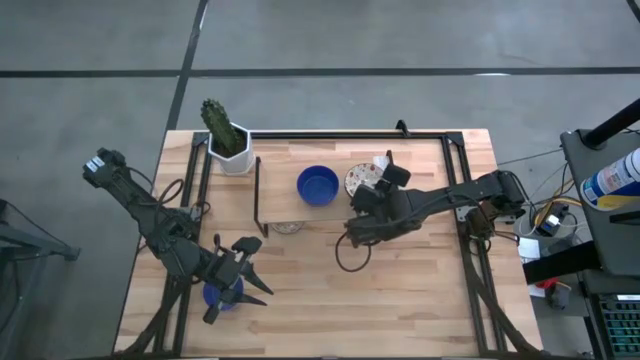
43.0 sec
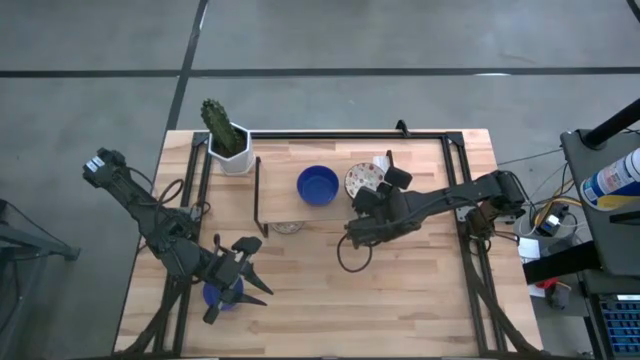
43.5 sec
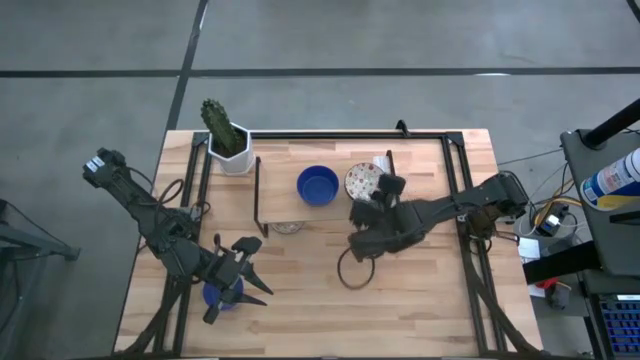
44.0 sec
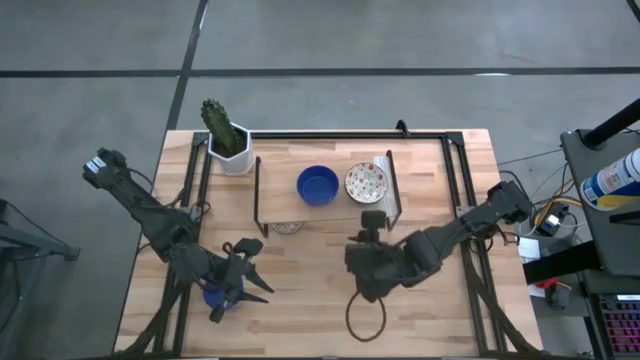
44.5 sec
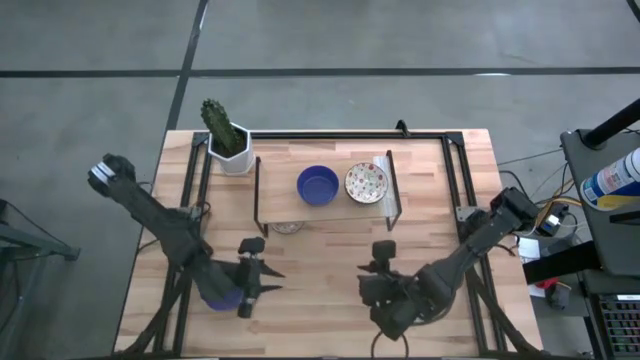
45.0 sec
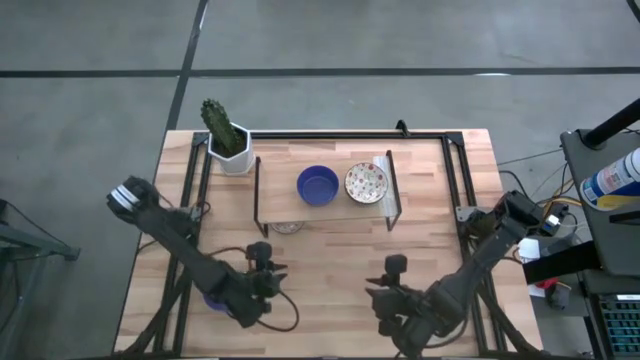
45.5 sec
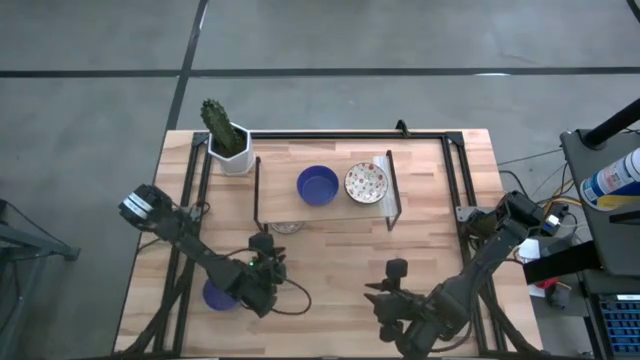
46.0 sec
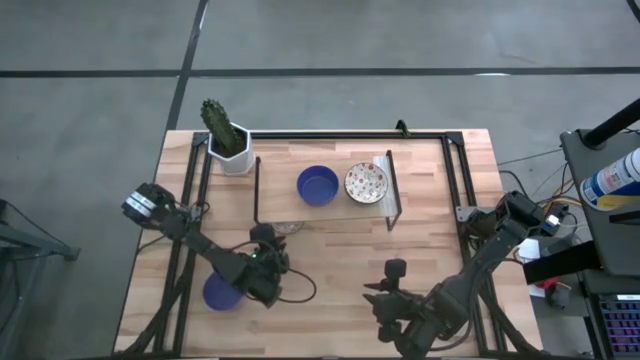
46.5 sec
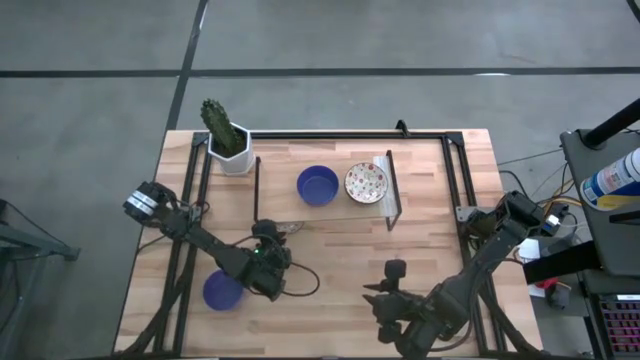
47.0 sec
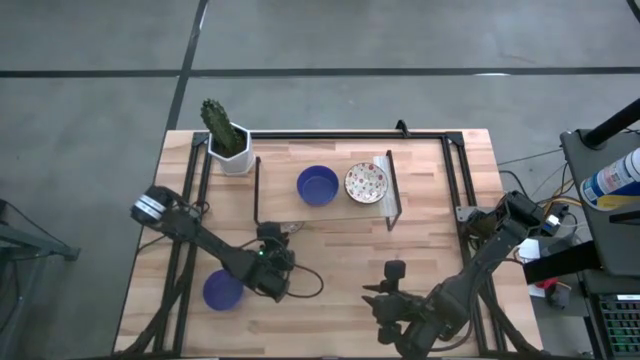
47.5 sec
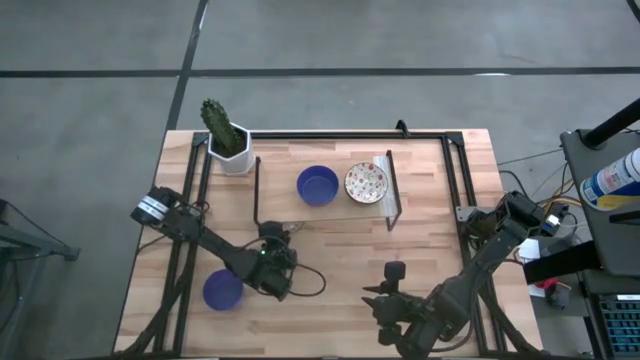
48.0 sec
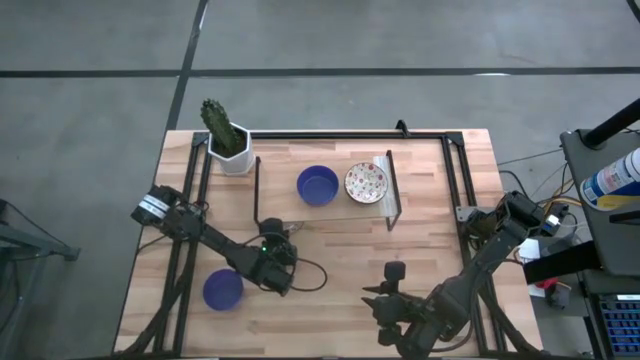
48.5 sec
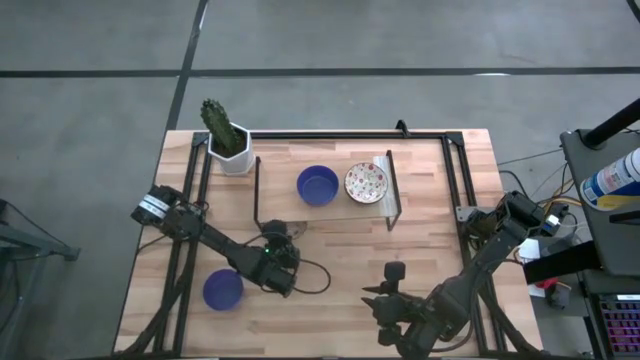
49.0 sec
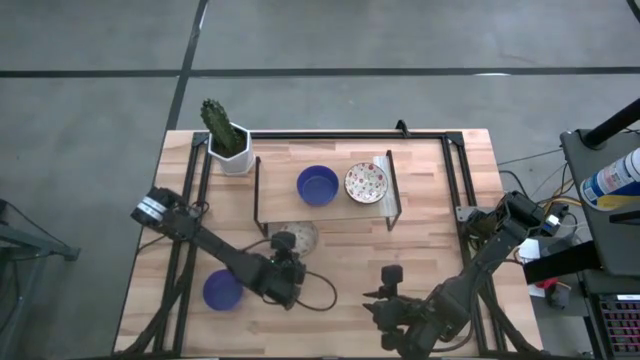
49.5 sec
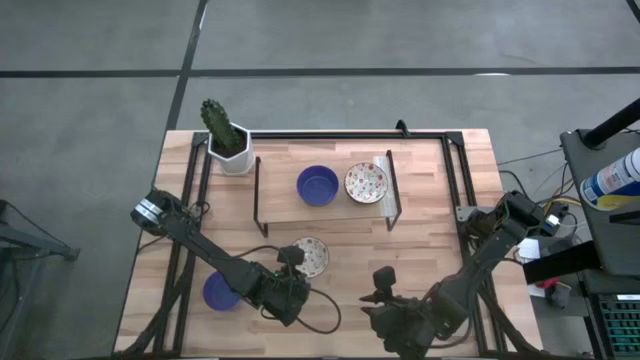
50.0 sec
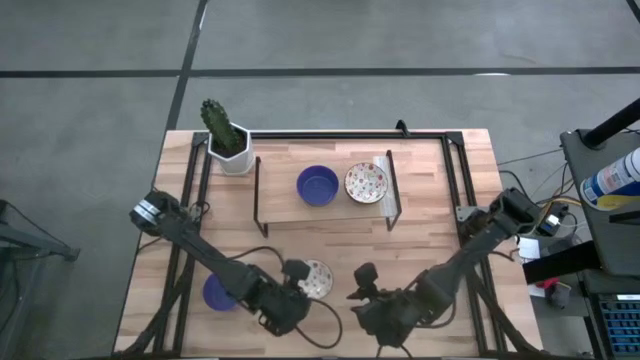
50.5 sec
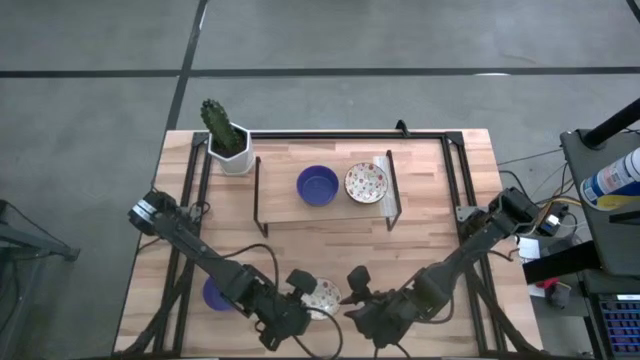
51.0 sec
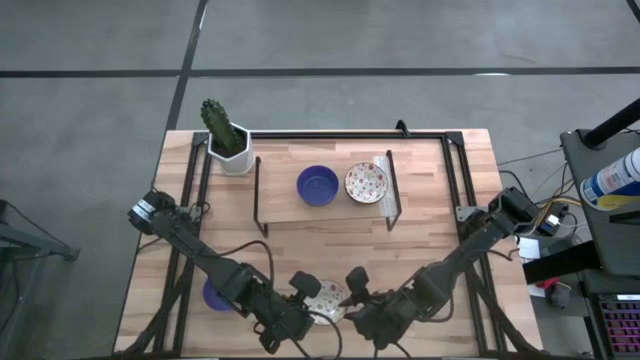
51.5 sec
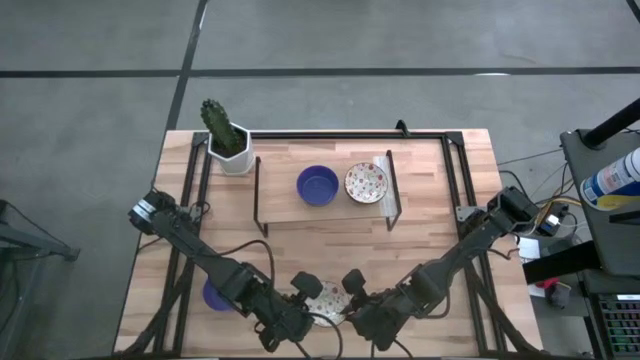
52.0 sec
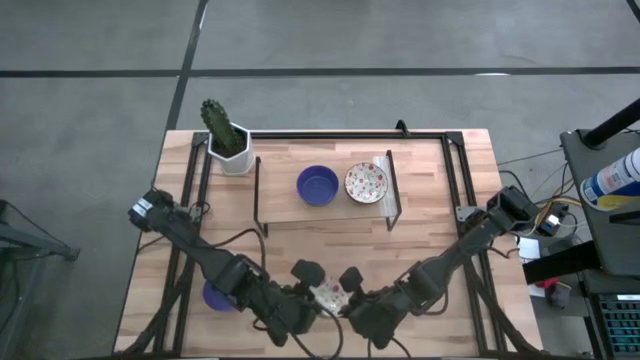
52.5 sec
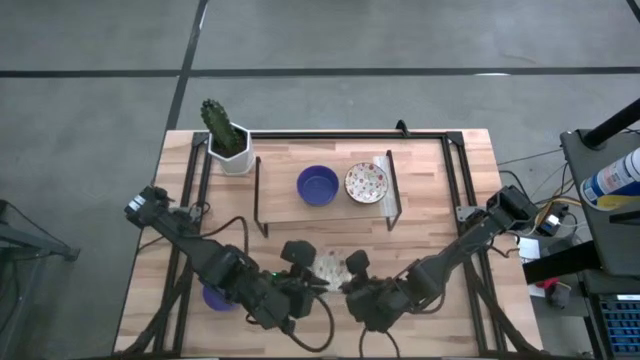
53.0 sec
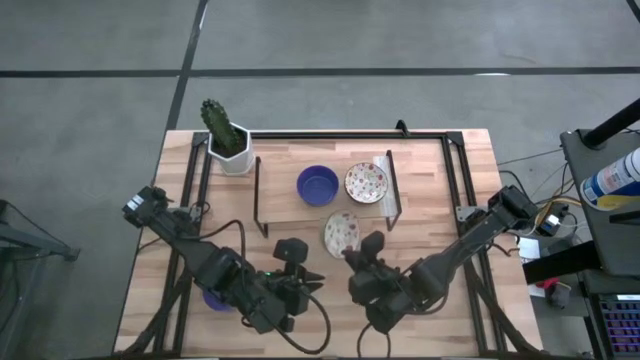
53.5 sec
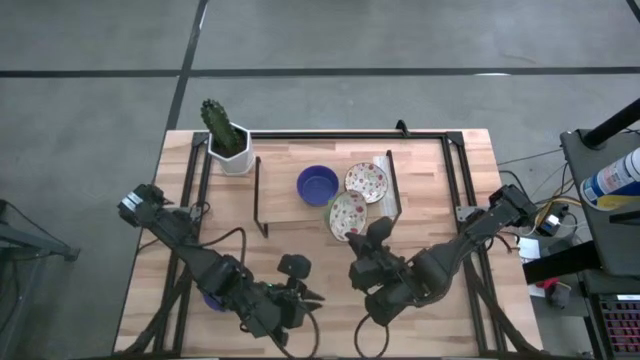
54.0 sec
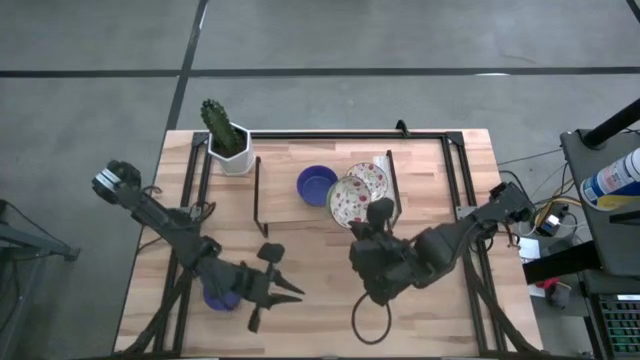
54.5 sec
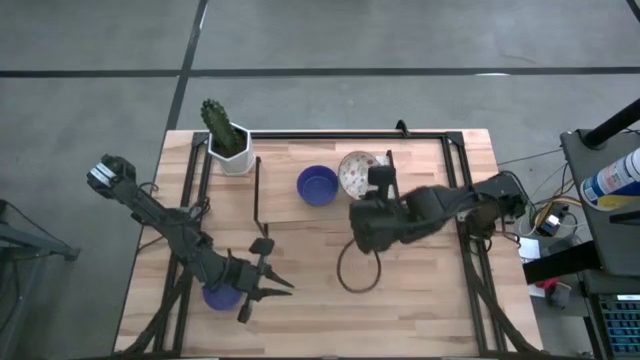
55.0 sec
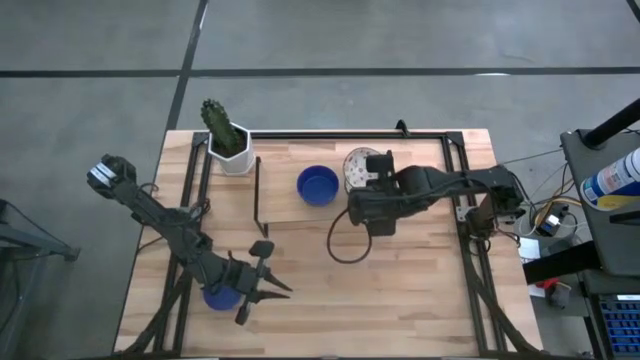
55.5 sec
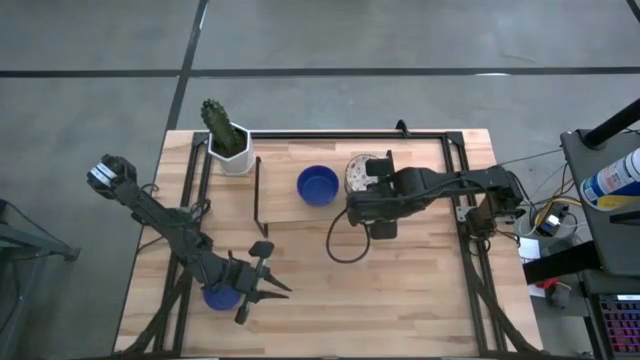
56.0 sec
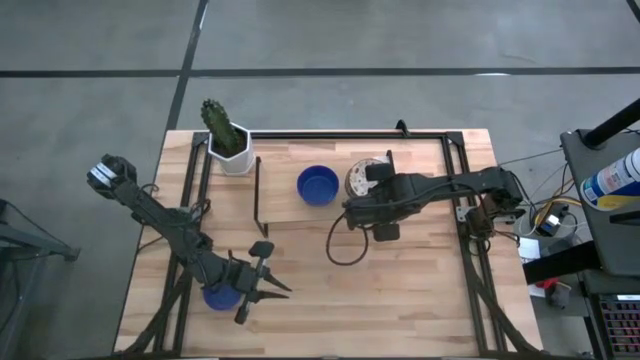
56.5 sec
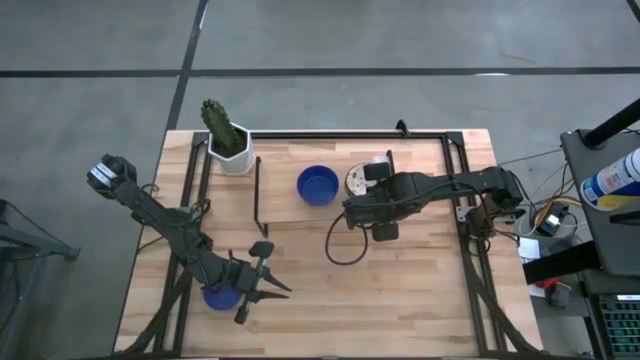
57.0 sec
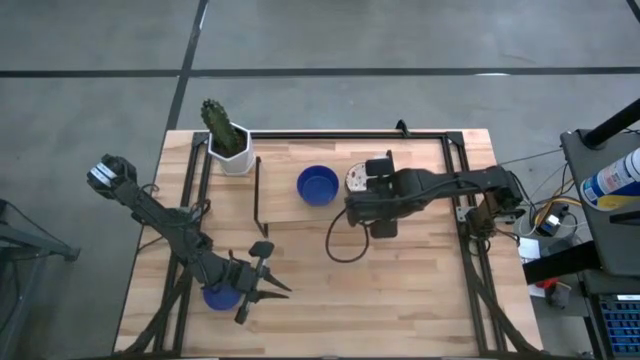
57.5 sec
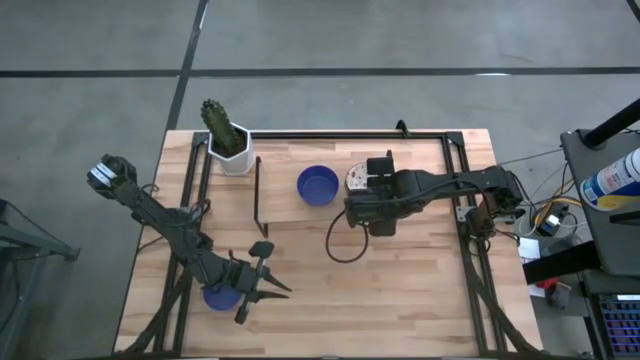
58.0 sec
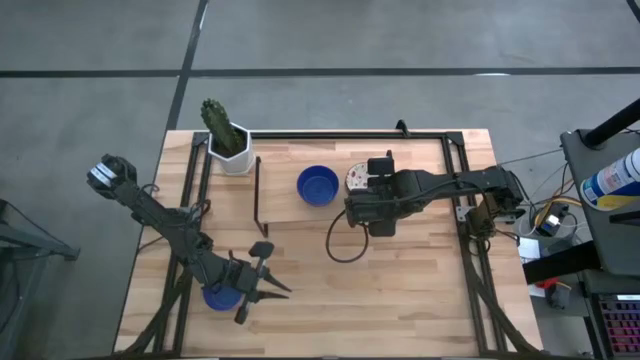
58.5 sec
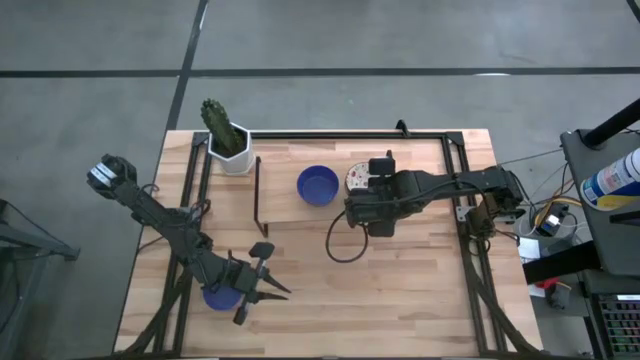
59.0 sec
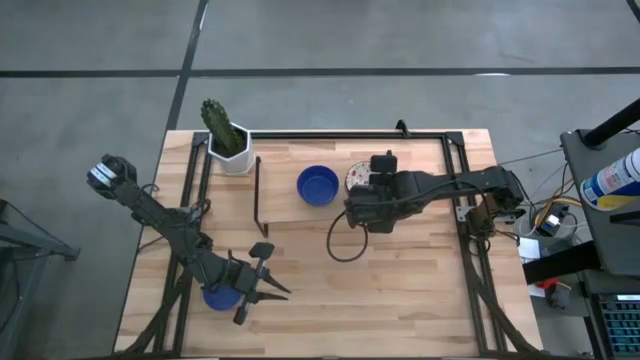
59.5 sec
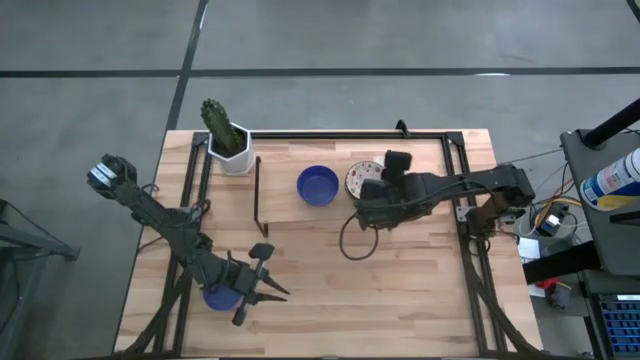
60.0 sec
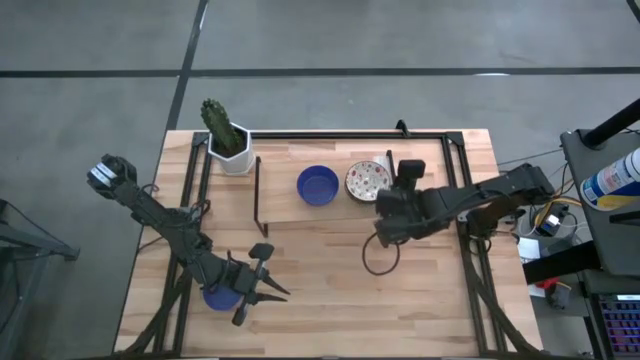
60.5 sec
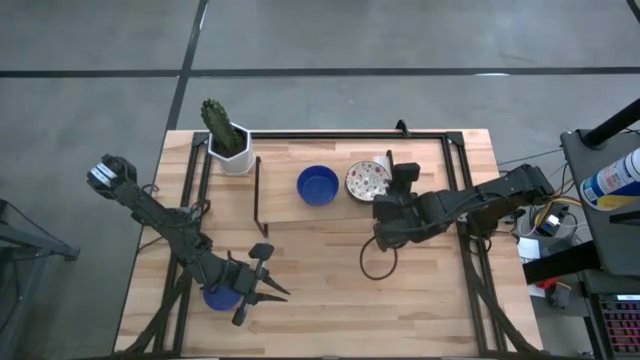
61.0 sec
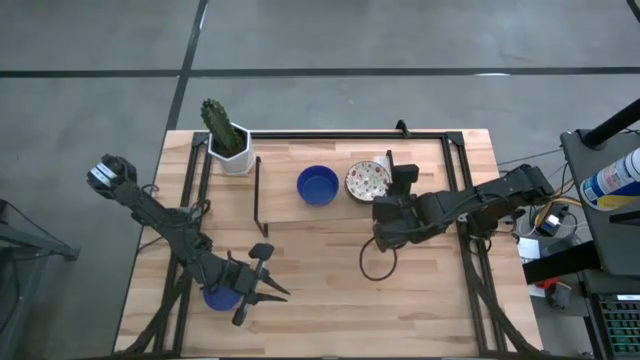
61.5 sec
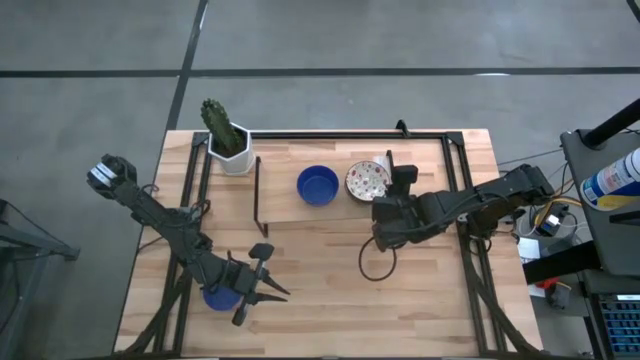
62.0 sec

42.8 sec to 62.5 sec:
Task: Pick & Place Mini bowls
Stack the red and white bowl on the stacked red and white bowl on the shelf

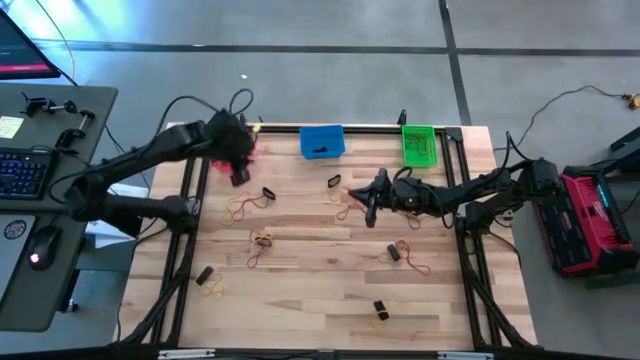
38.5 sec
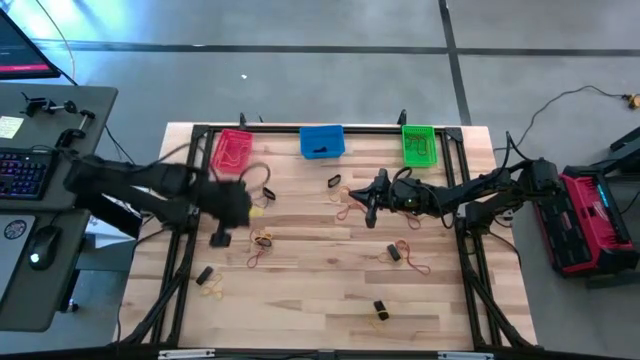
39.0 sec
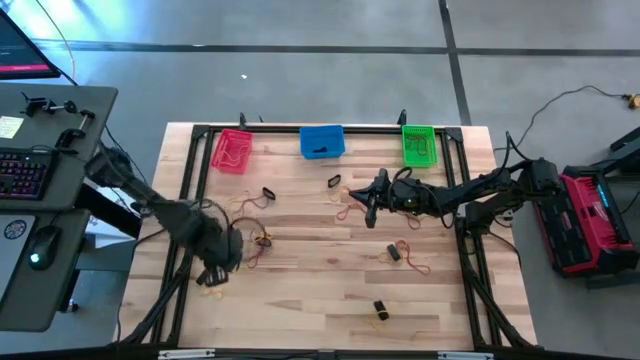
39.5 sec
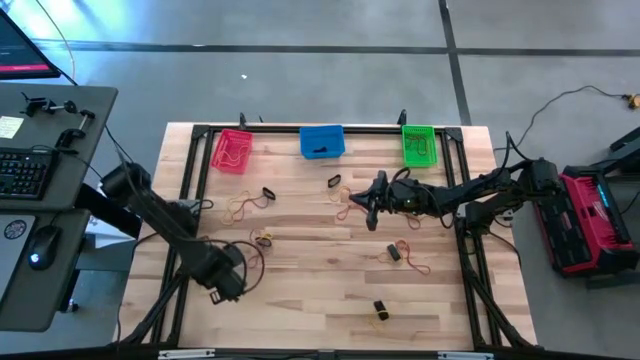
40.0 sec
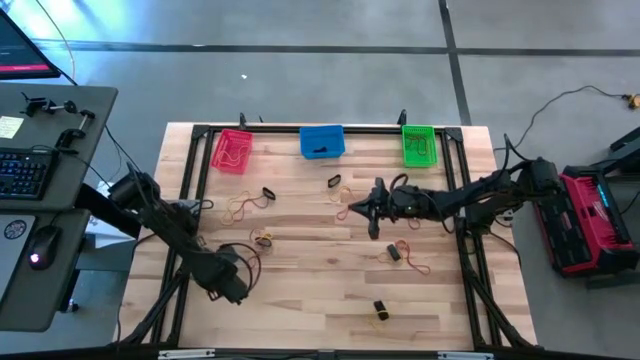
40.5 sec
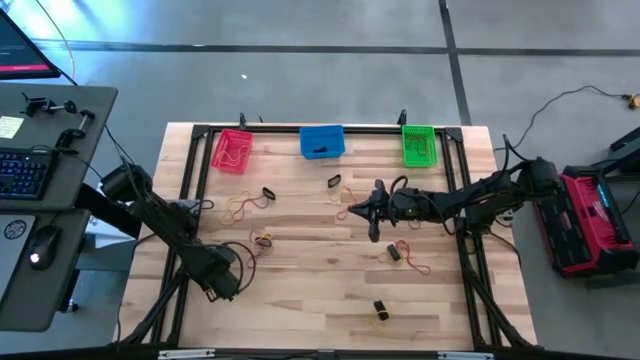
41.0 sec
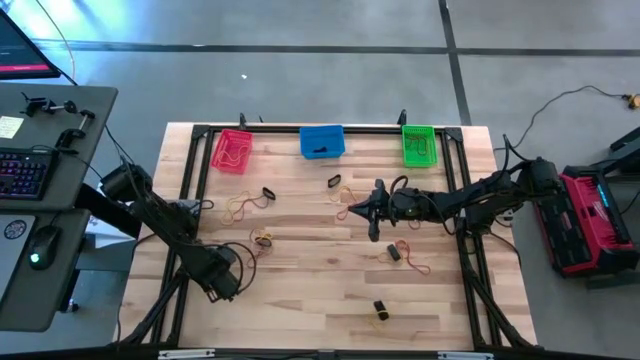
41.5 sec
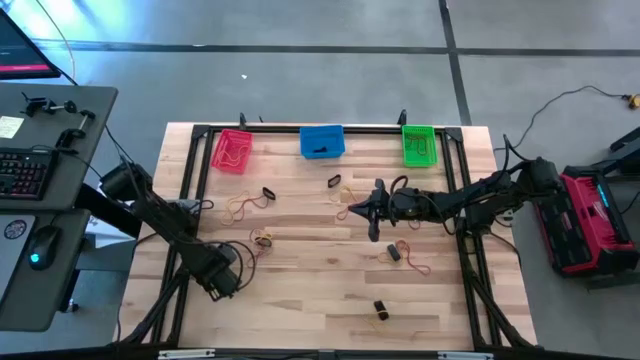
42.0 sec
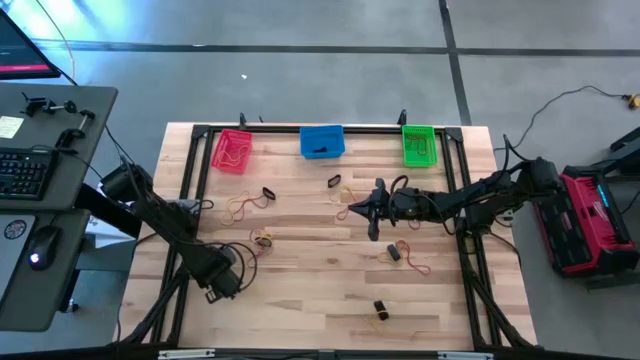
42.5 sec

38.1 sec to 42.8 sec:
Task: Sort rubber bands into baskets
Put the black rubber band into the blue bin
